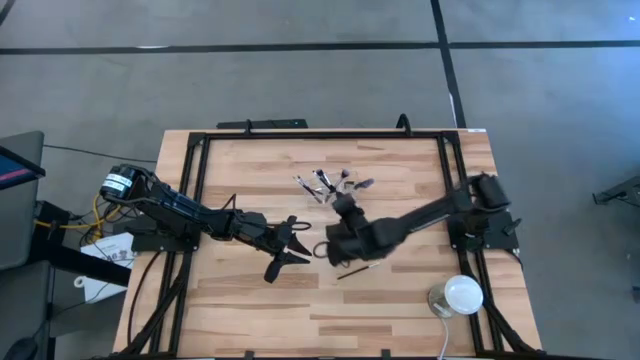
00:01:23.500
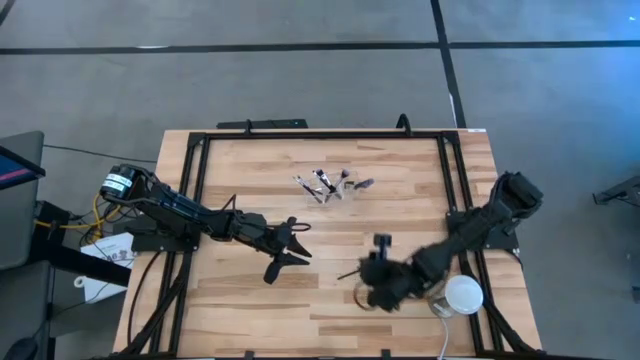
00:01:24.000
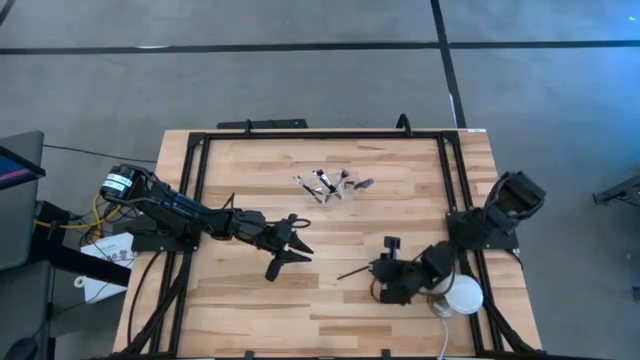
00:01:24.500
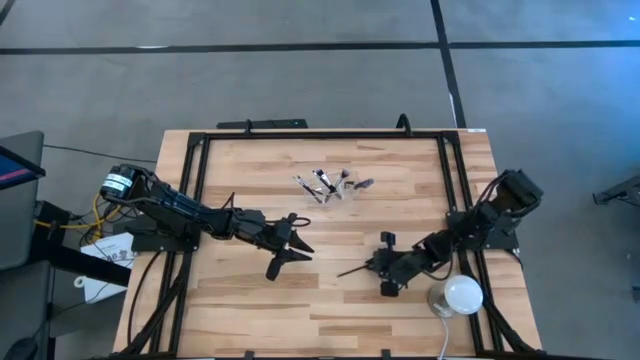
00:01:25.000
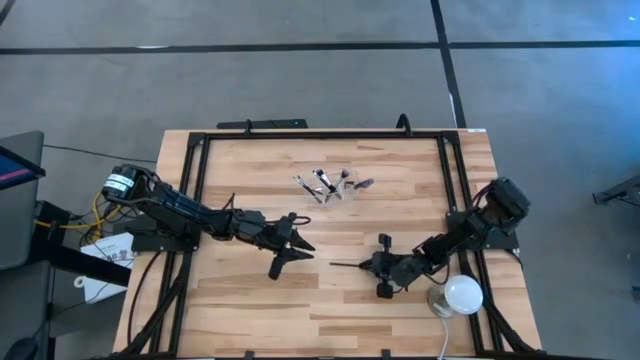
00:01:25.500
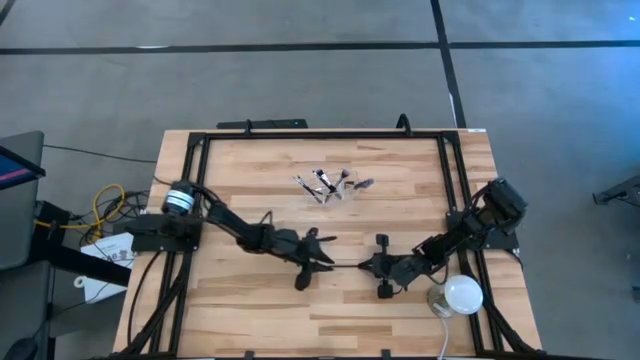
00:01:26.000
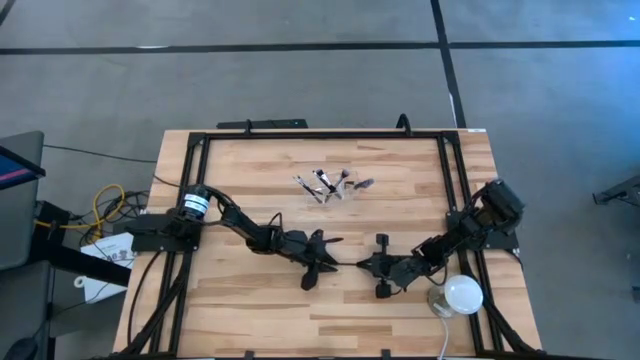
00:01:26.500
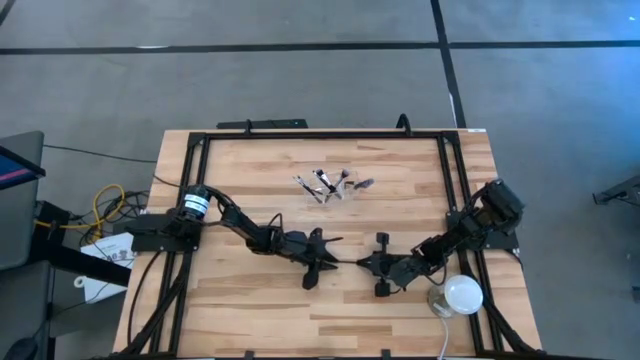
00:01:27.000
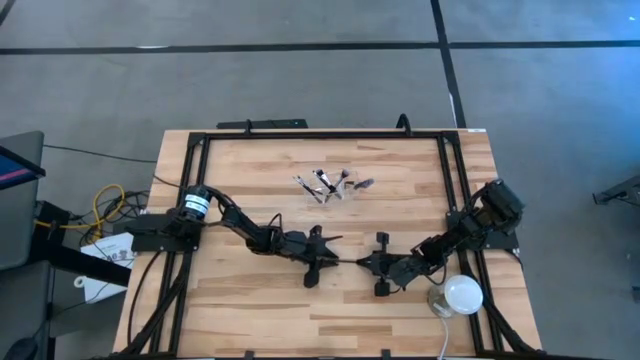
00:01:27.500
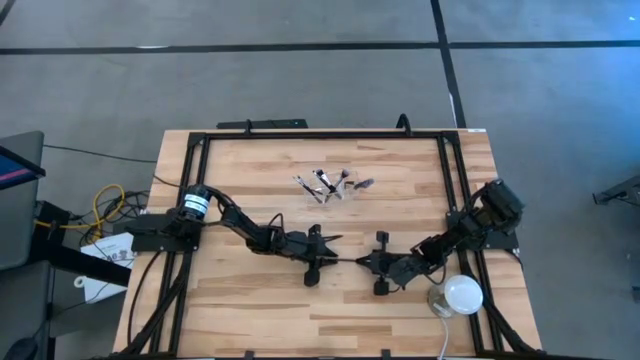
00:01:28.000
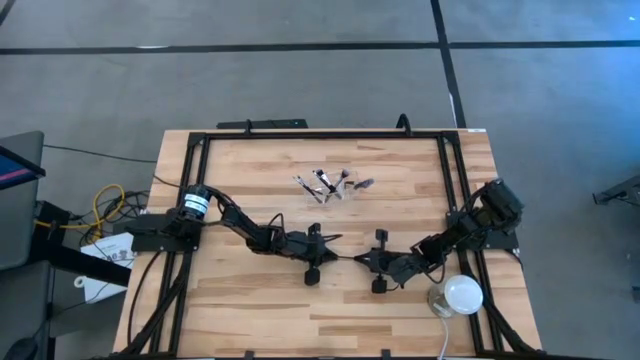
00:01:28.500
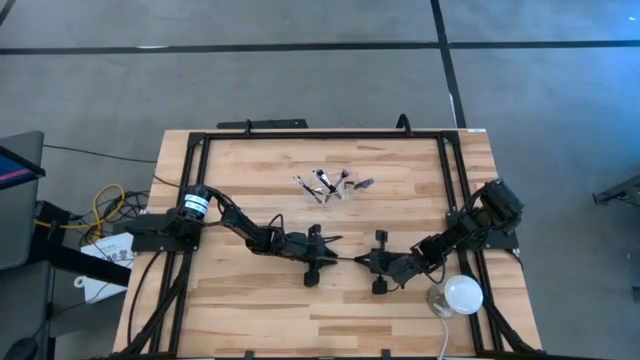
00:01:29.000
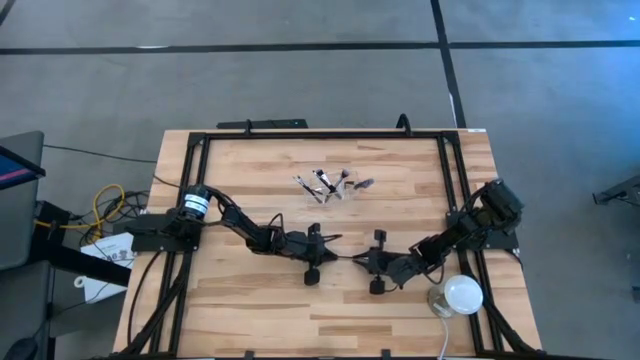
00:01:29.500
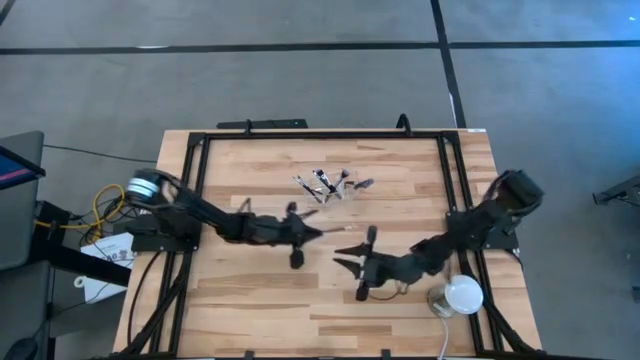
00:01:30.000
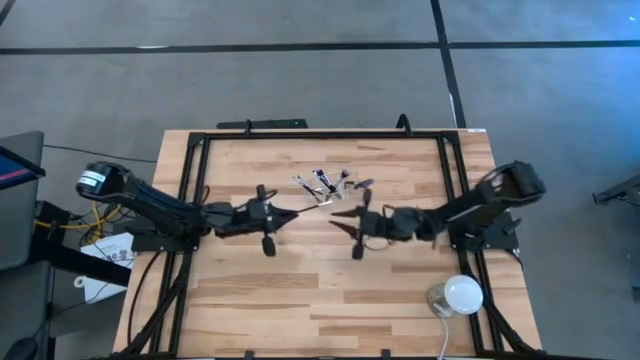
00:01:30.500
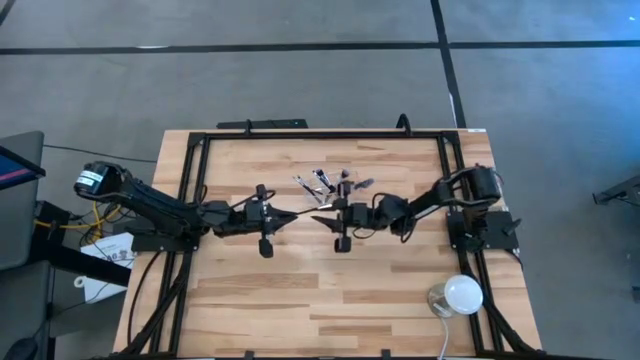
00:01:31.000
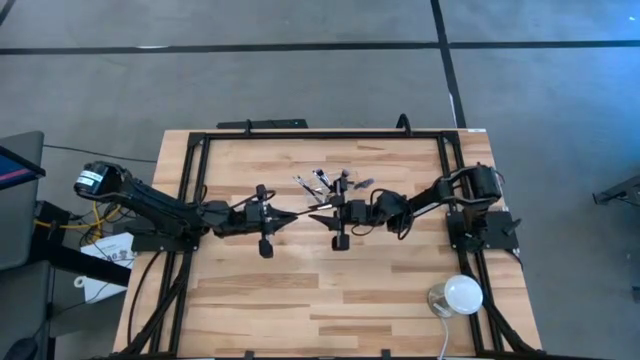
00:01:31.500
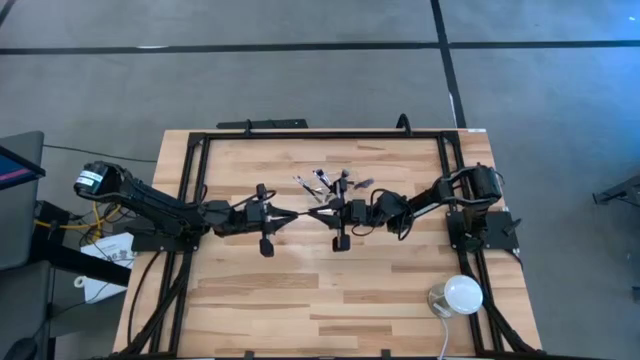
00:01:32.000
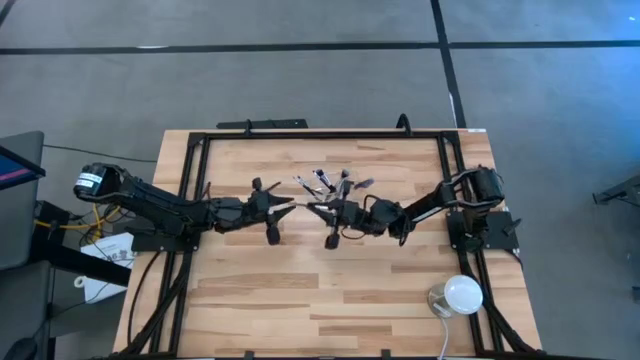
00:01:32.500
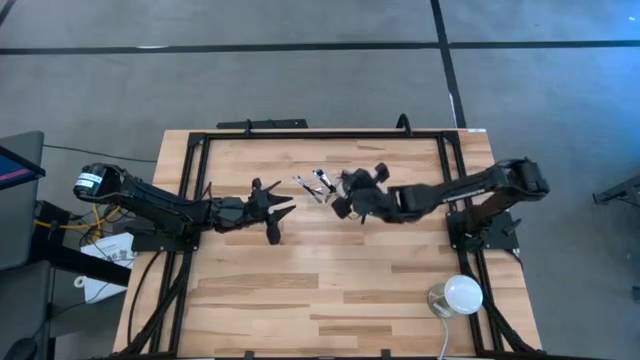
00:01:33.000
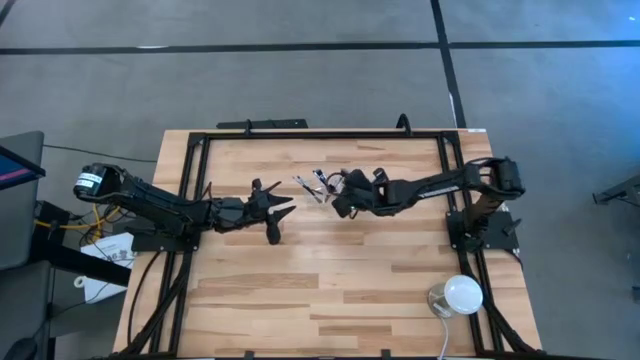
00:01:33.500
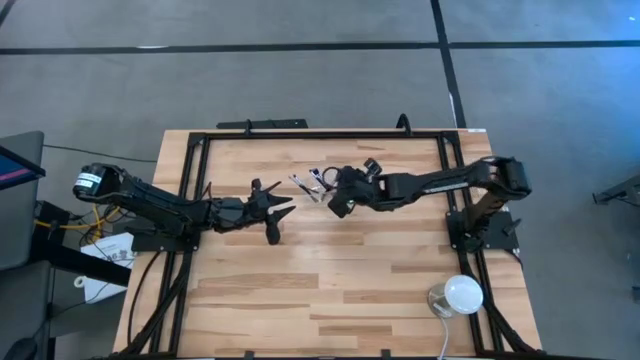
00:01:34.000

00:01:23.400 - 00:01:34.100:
Task: Put items in baskets/containers
Put the eyeshadow brush into the transparent organizer

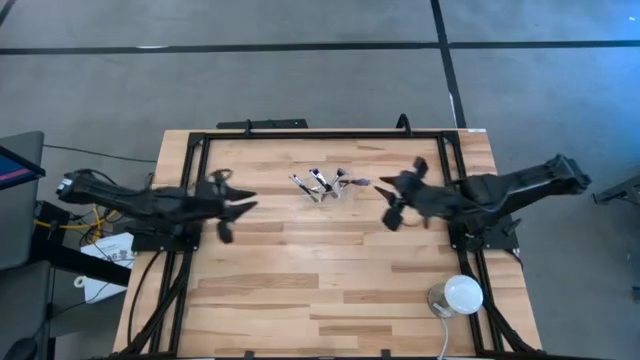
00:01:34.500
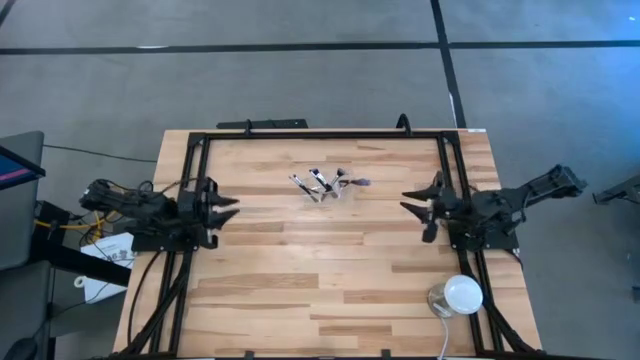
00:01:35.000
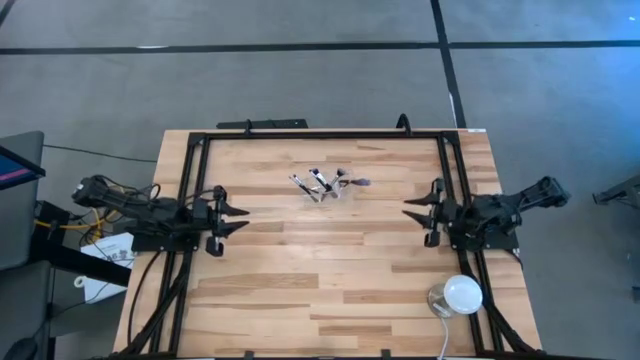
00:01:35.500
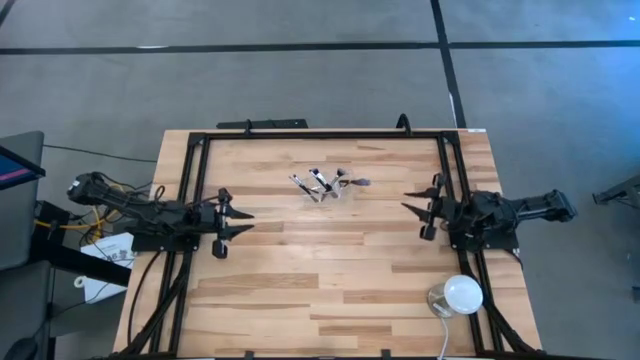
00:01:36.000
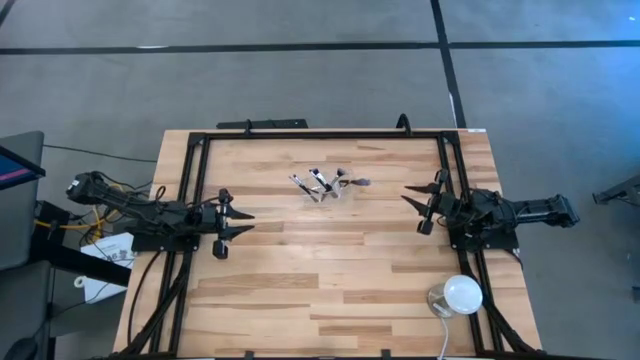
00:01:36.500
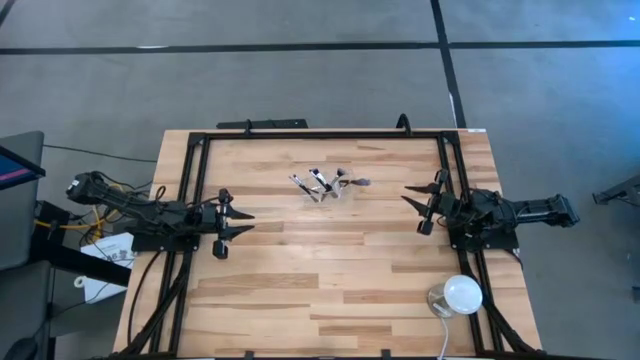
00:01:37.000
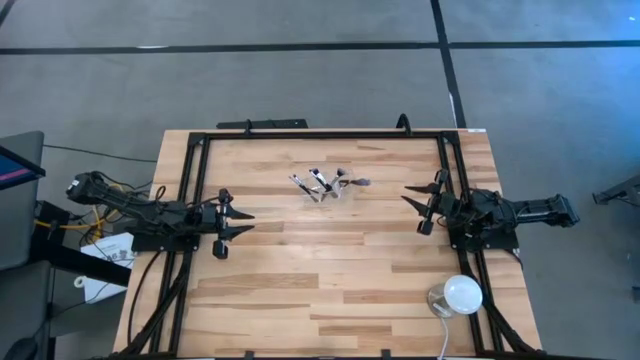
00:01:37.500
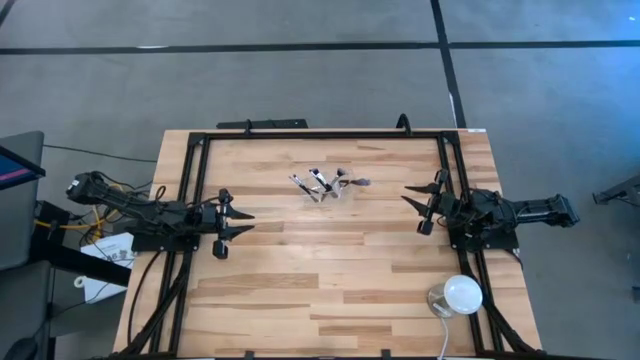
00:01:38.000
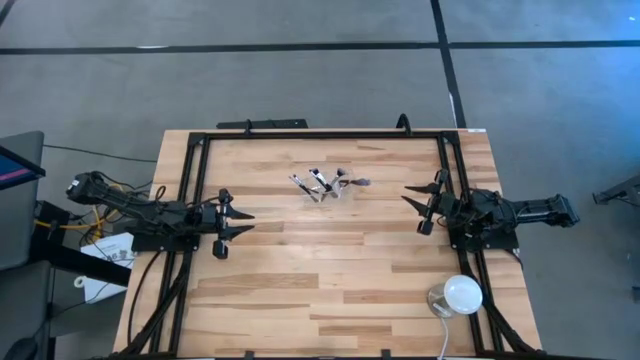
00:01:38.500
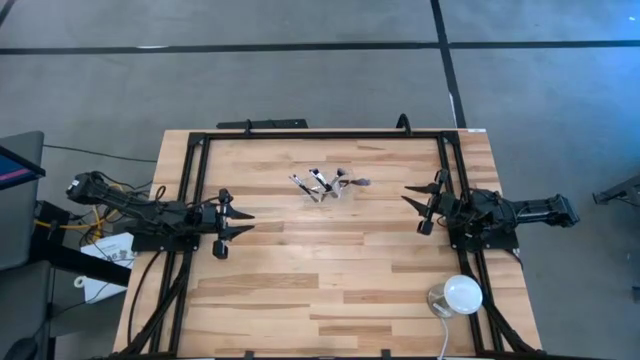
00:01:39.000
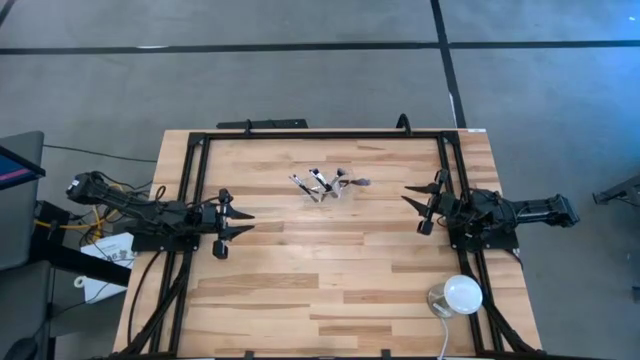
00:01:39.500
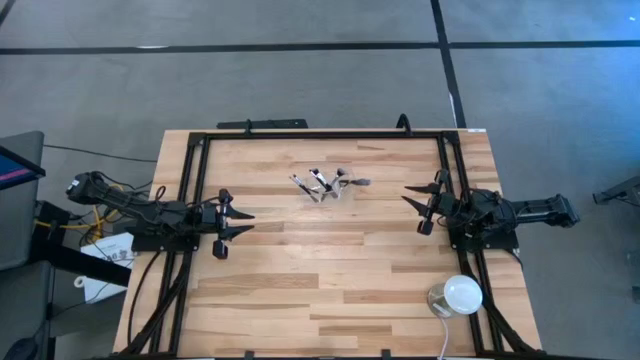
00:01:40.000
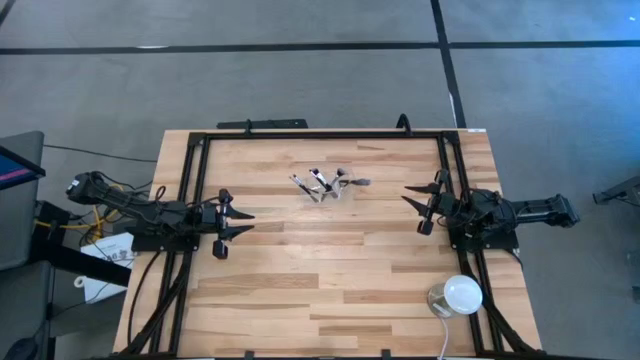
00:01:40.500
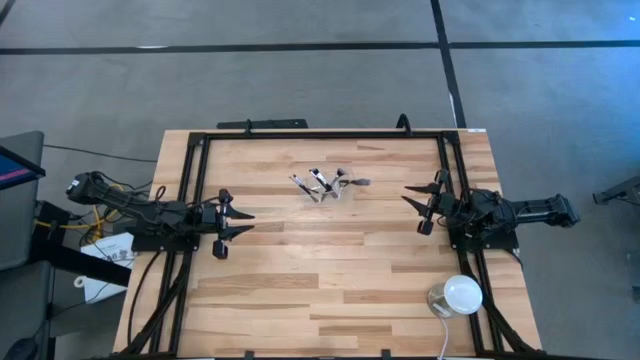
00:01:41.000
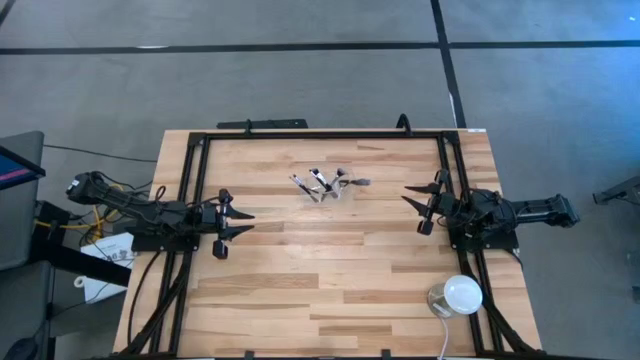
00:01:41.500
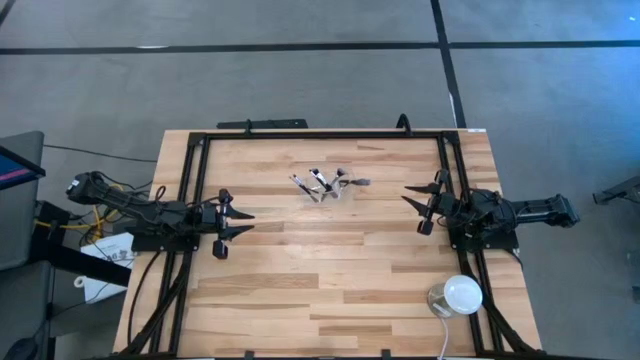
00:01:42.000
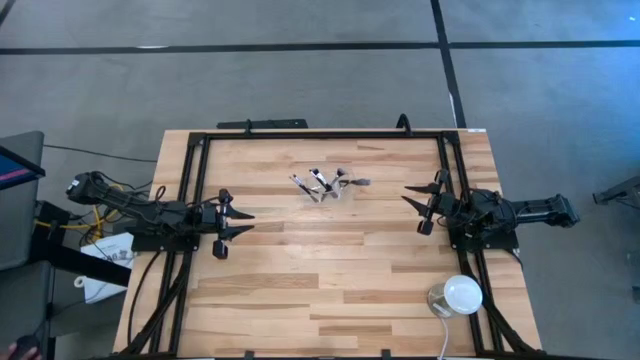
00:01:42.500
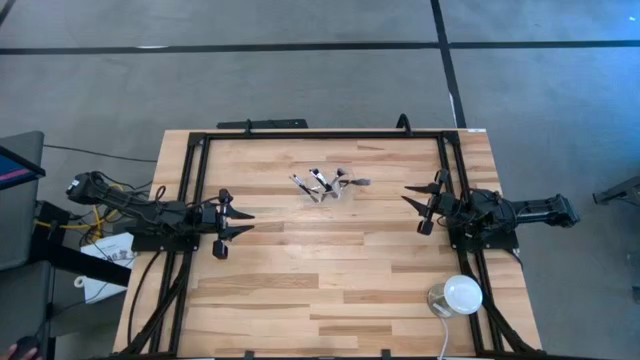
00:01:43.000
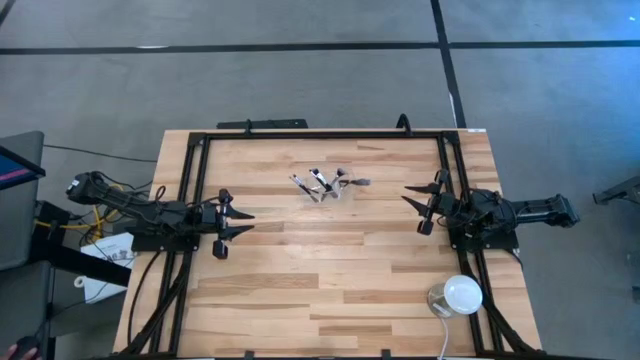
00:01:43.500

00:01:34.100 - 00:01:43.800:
Return to Home Position
